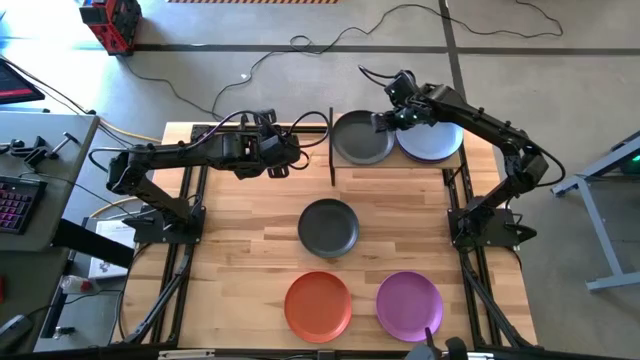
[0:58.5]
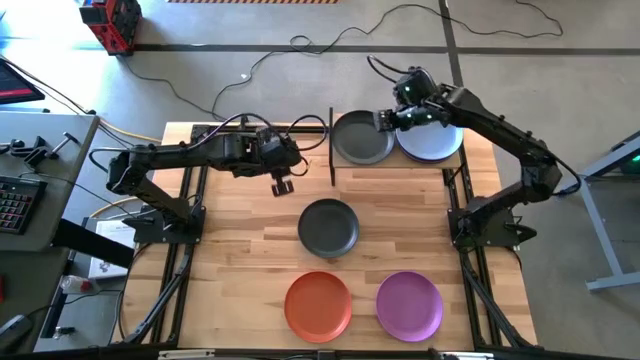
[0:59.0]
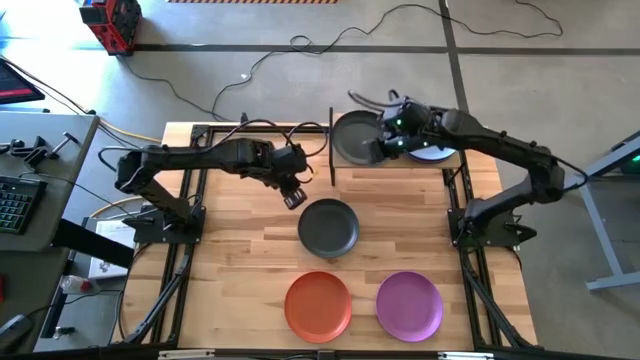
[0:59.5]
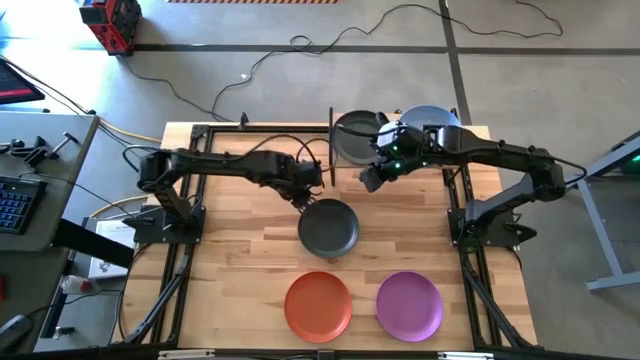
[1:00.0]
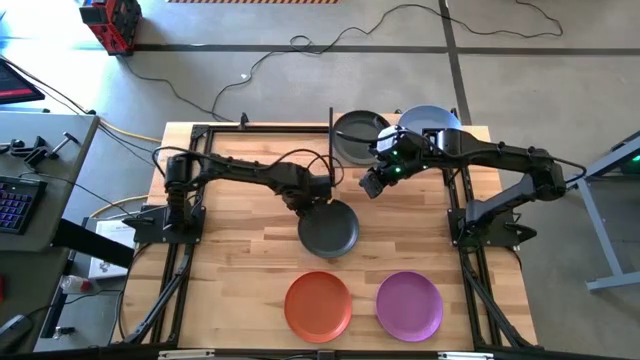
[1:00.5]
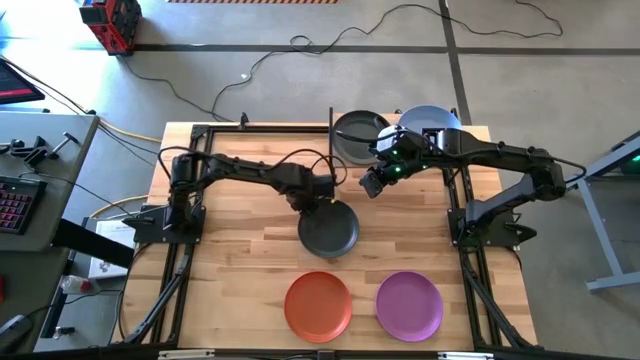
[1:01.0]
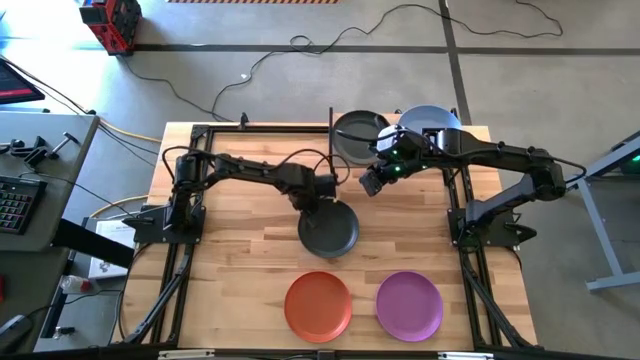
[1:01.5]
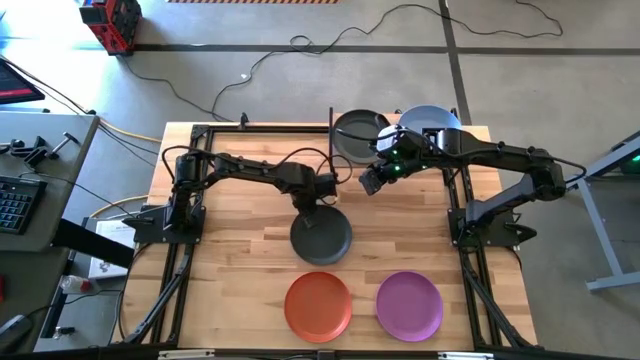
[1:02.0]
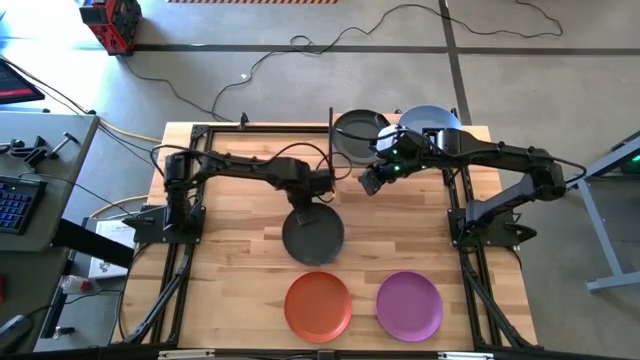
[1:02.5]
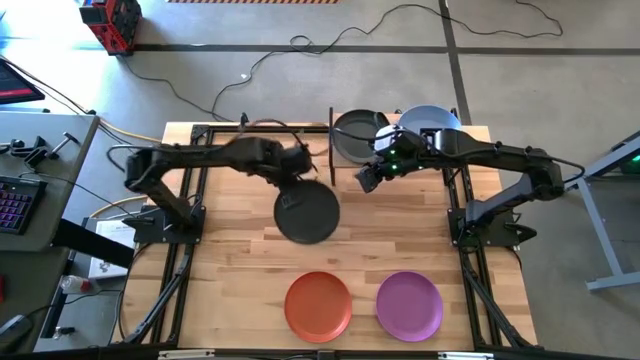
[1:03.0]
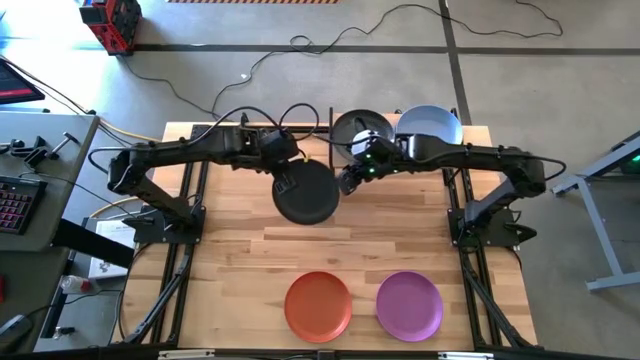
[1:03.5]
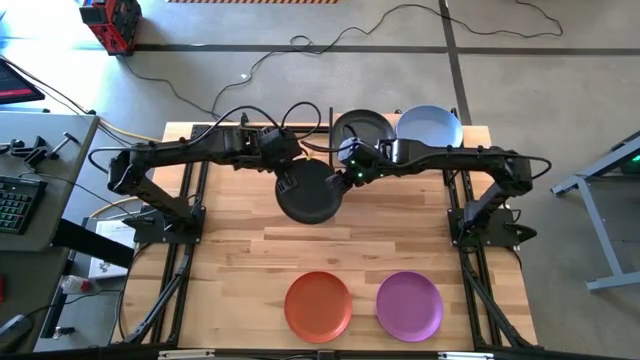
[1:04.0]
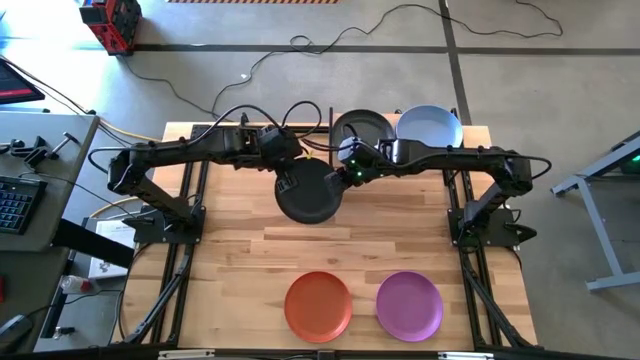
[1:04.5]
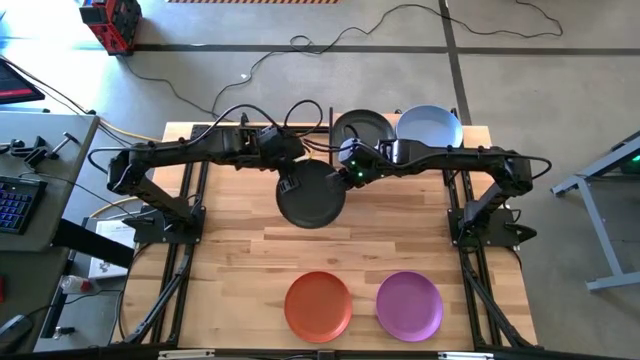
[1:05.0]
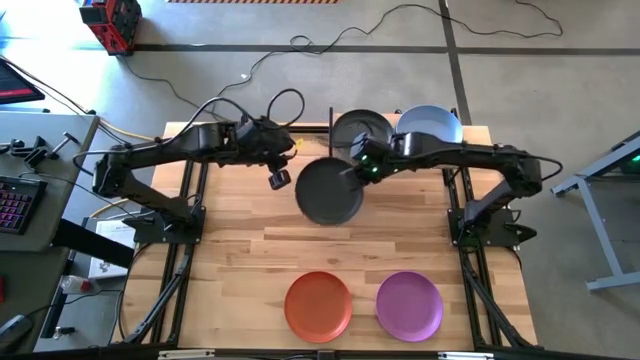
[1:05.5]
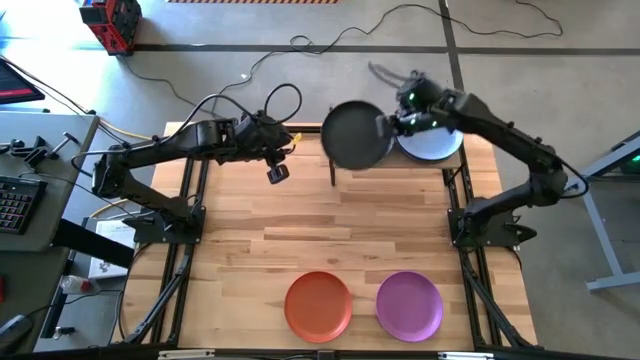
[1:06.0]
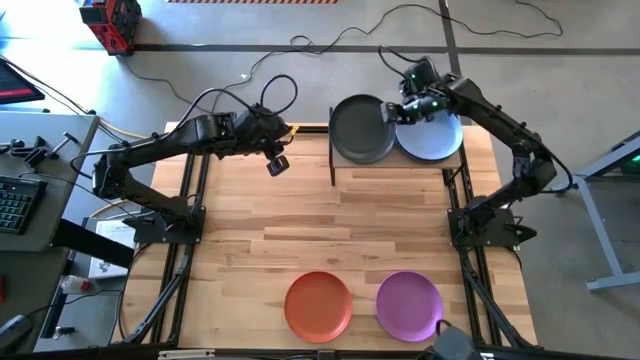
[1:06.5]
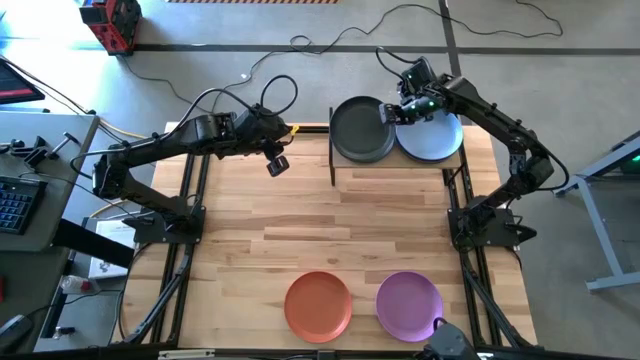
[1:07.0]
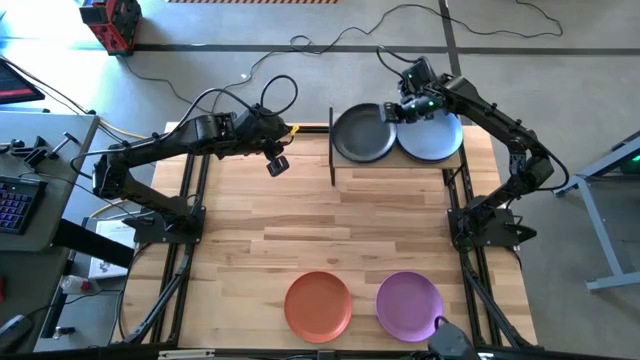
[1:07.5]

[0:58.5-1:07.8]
Task: Place and stack plates onto a shelf
Stack the black plate on top of the black plate on the shelf

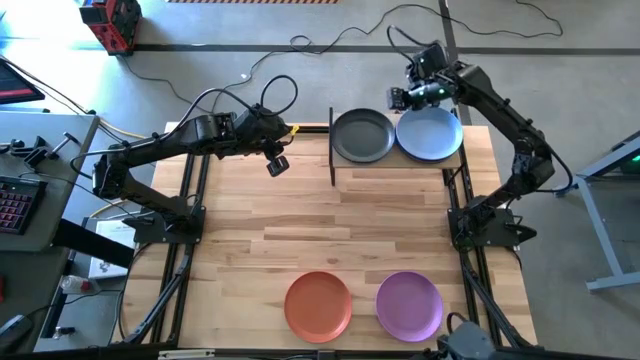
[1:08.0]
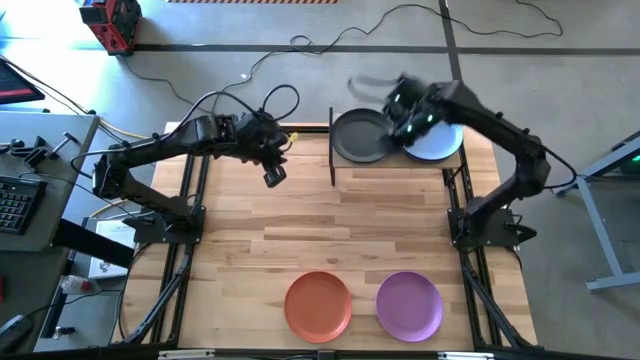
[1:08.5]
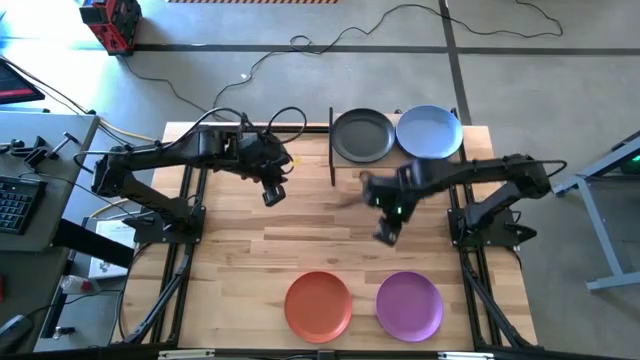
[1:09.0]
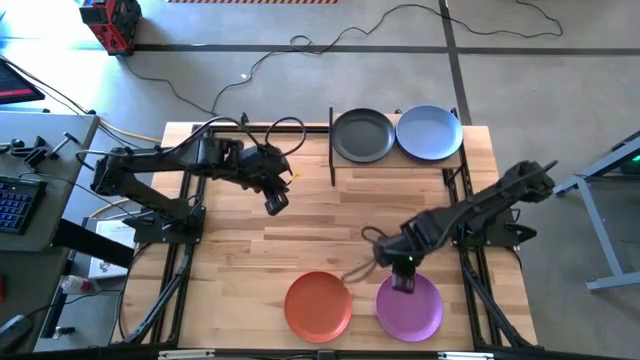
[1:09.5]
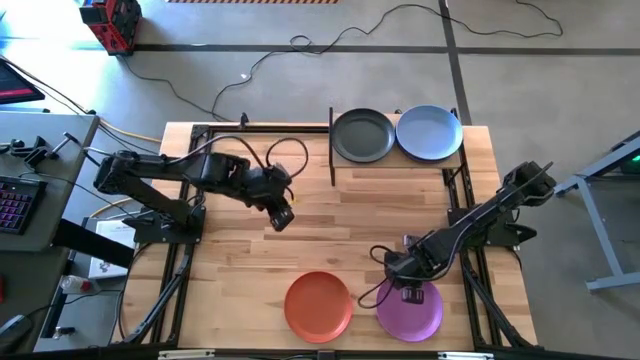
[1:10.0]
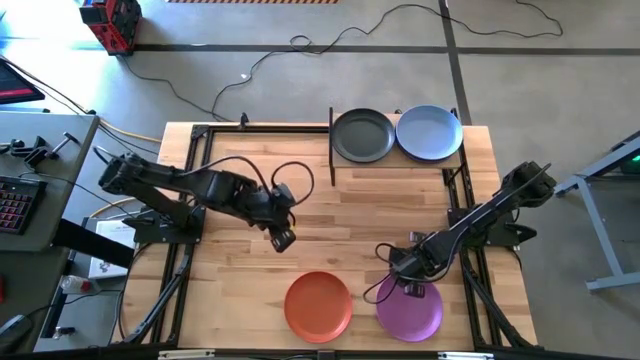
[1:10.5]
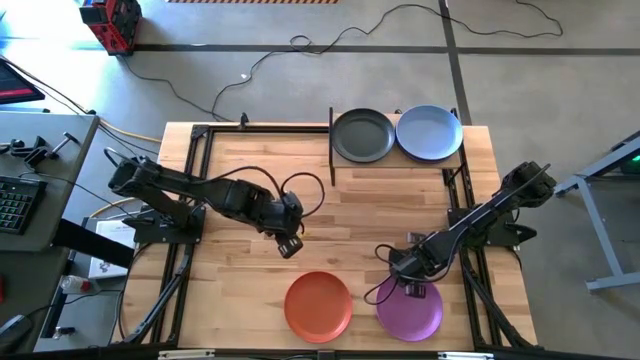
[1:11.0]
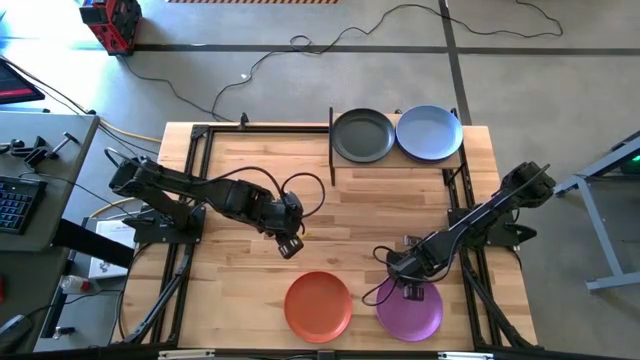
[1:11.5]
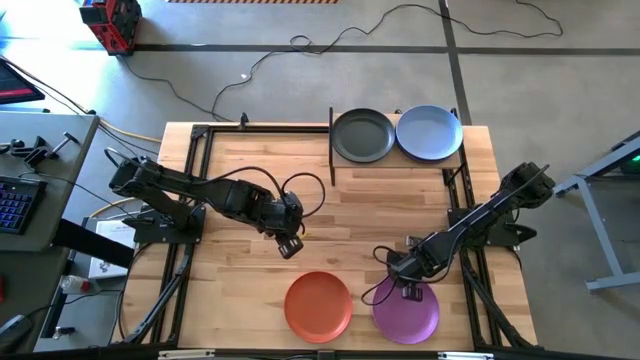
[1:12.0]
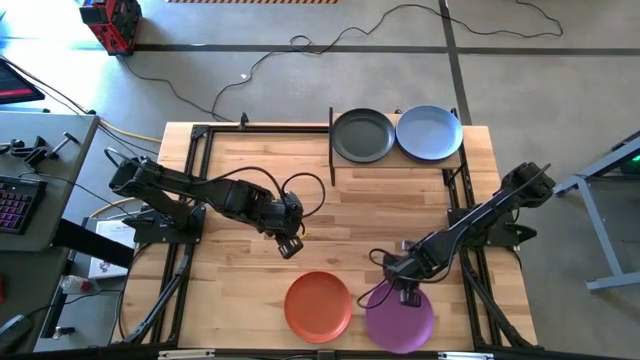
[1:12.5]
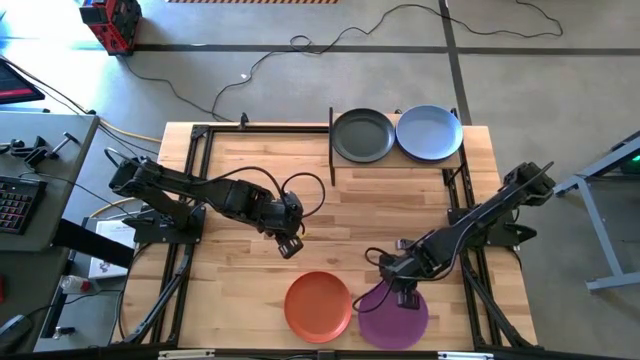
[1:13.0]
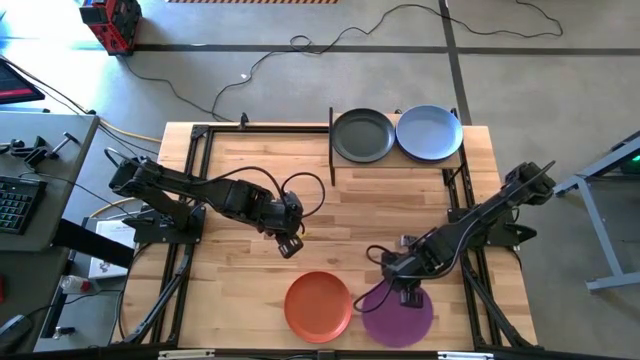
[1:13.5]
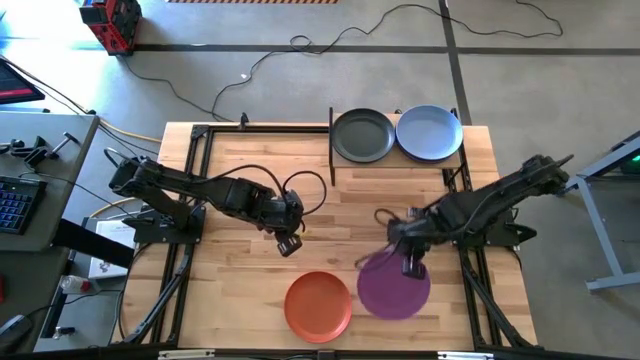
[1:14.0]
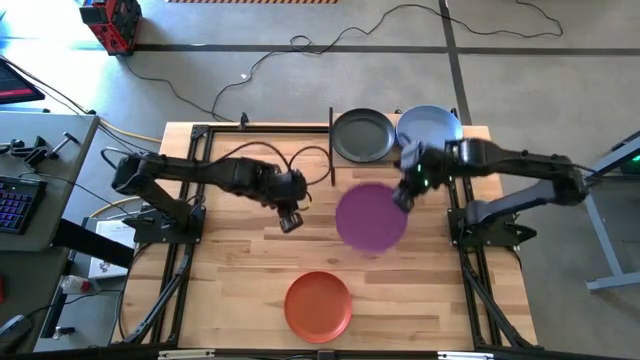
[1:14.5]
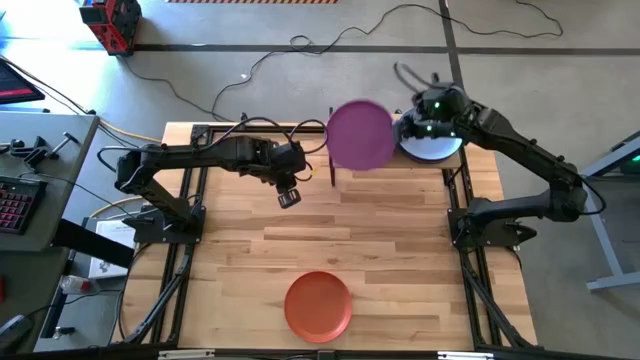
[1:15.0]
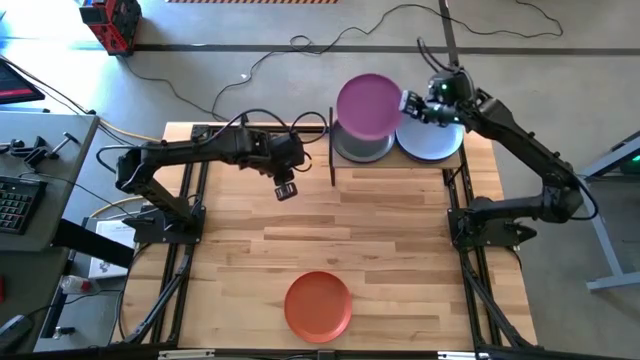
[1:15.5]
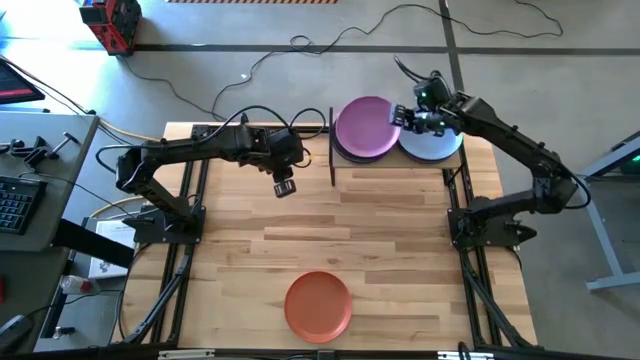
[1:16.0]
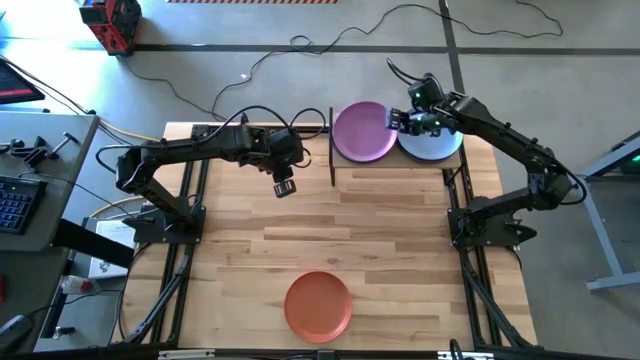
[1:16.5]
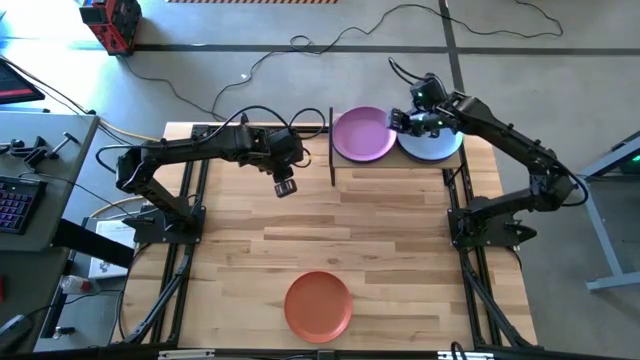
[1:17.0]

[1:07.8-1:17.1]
Stack the violet plate on top of the black plate on the shelf

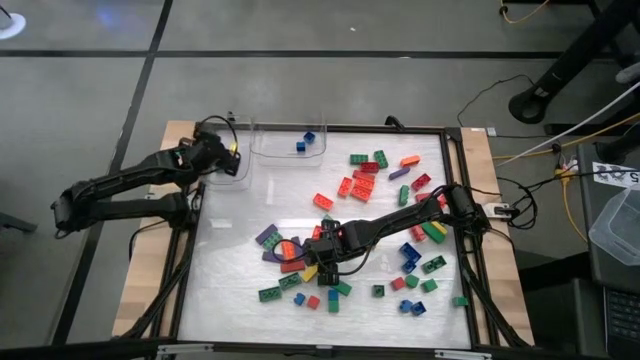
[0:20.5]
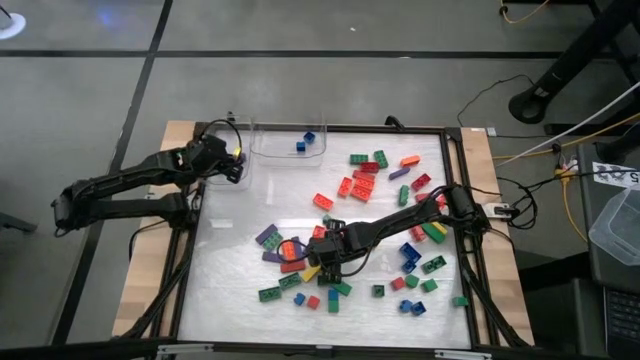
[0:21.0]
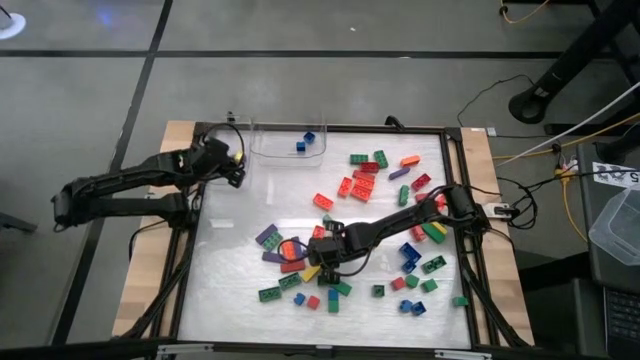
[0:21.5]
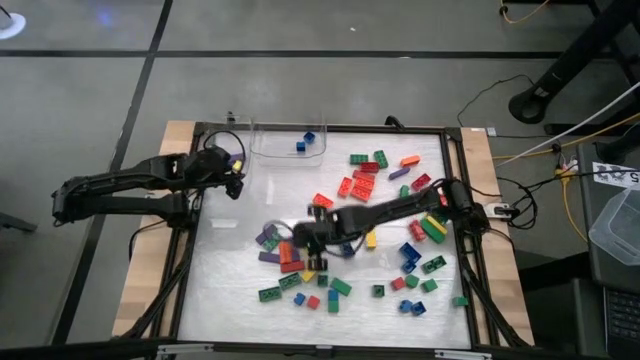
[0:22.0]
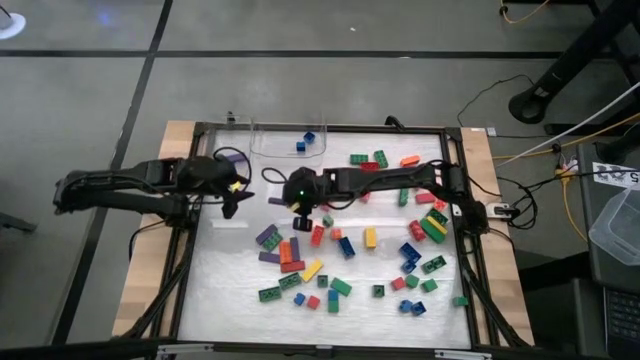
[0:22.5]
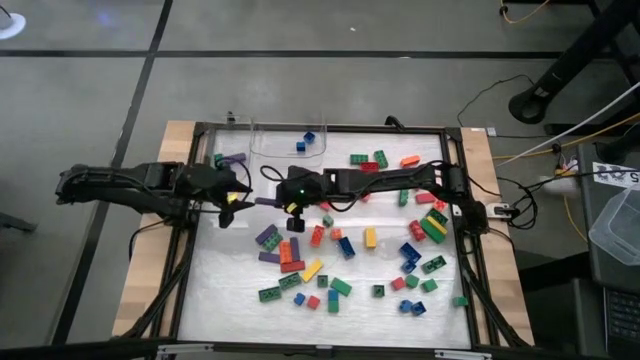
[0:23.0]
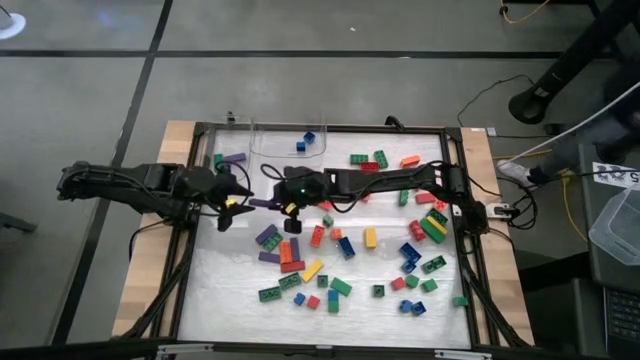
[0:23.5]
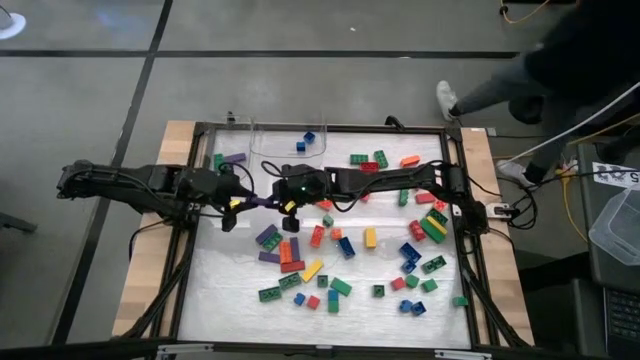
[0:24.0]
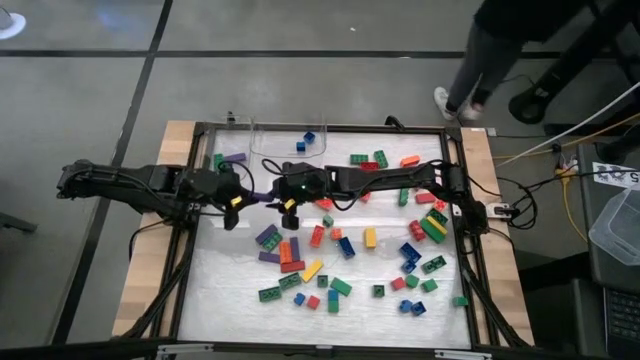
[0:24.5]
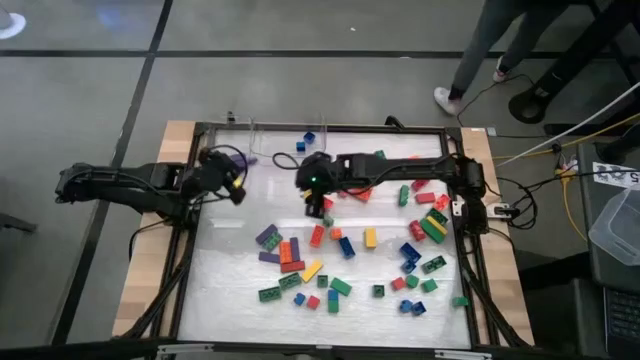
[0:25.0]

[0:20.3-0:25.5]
Task: Sort blocks by size
Put the large purple block into the left transparent bin
